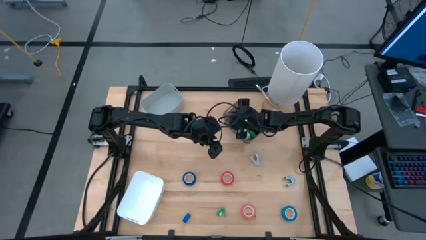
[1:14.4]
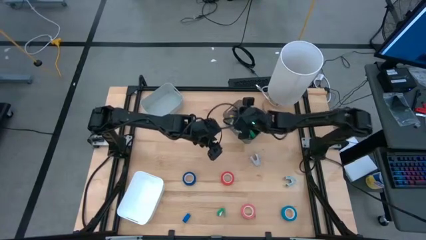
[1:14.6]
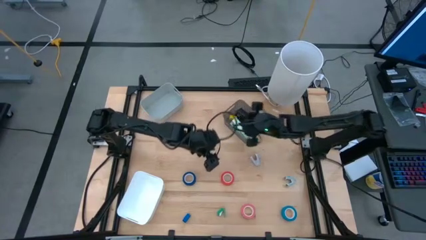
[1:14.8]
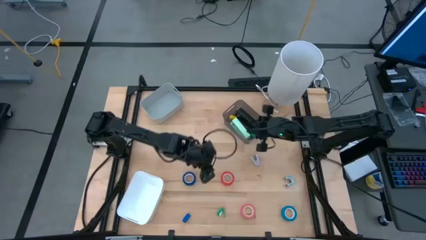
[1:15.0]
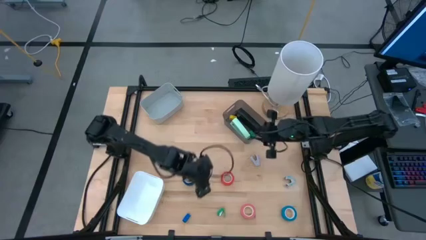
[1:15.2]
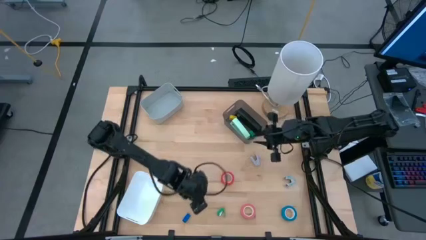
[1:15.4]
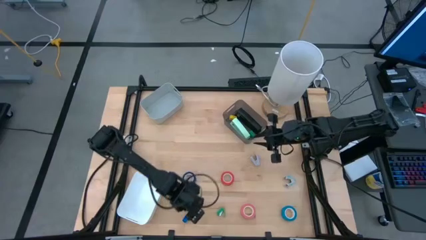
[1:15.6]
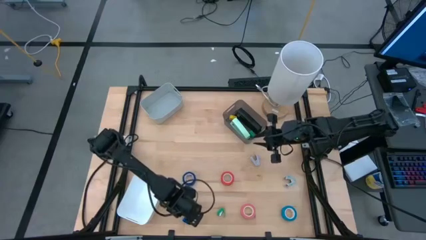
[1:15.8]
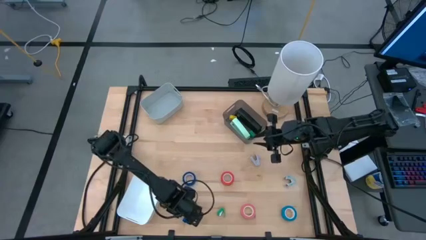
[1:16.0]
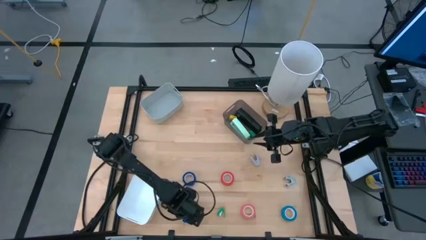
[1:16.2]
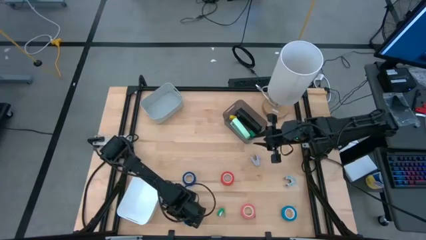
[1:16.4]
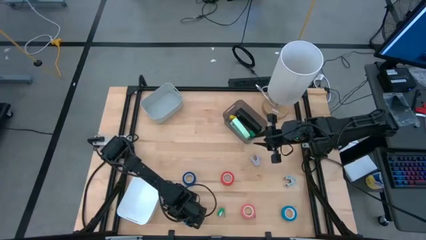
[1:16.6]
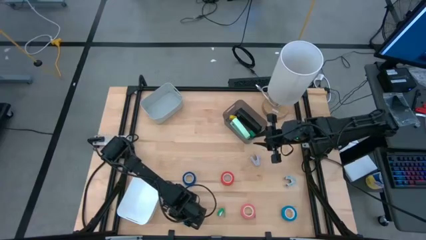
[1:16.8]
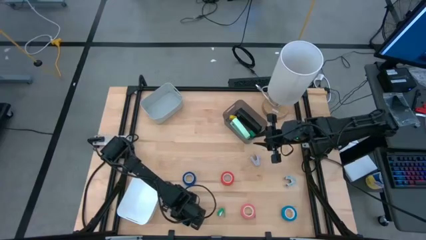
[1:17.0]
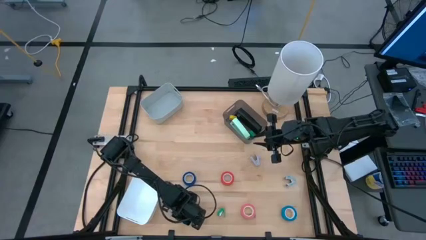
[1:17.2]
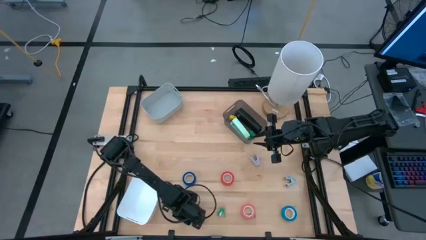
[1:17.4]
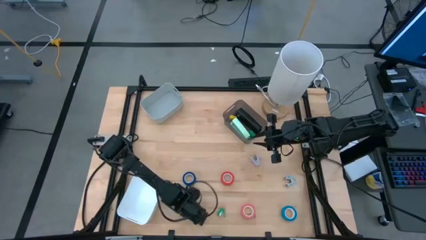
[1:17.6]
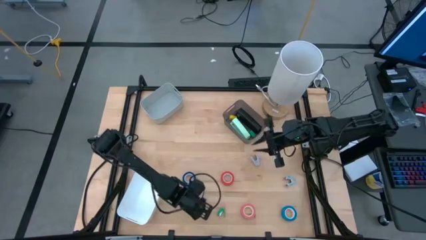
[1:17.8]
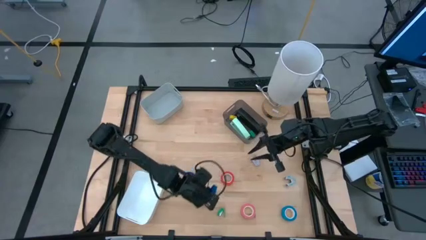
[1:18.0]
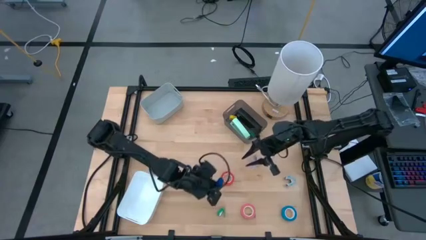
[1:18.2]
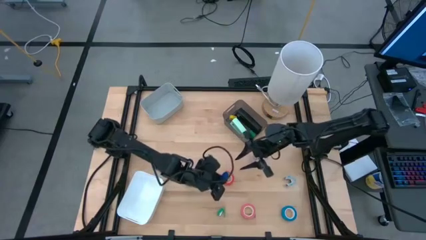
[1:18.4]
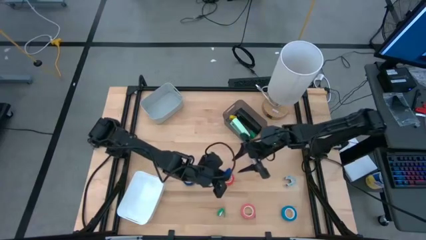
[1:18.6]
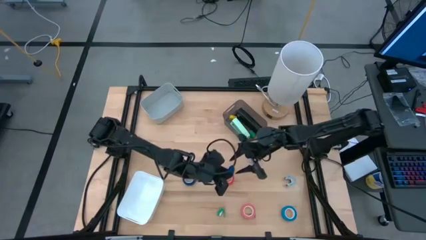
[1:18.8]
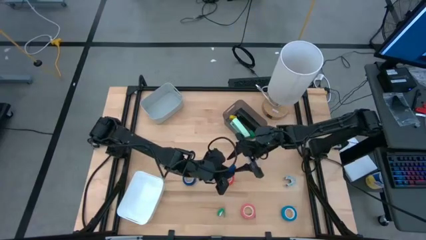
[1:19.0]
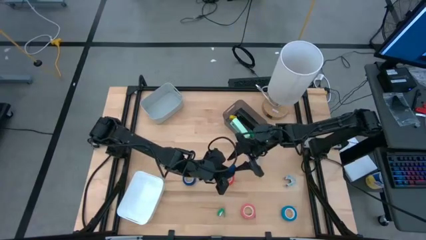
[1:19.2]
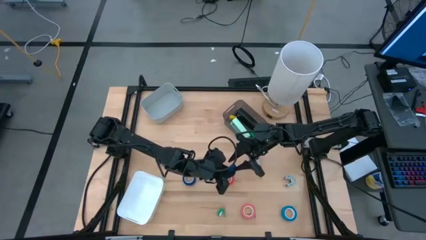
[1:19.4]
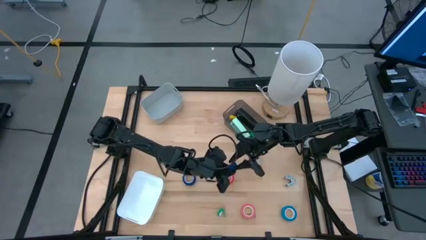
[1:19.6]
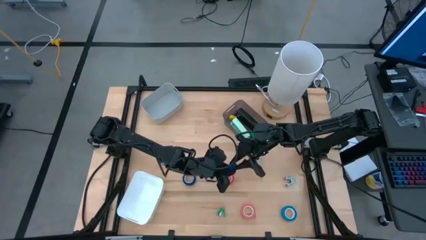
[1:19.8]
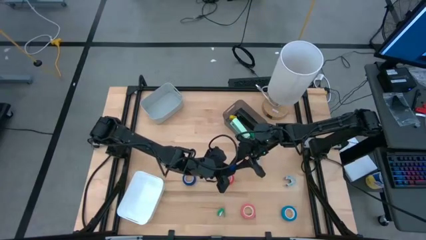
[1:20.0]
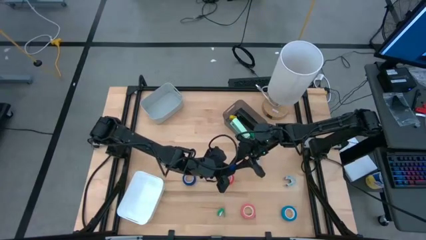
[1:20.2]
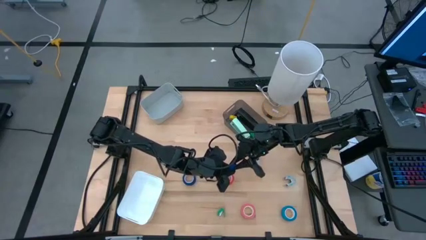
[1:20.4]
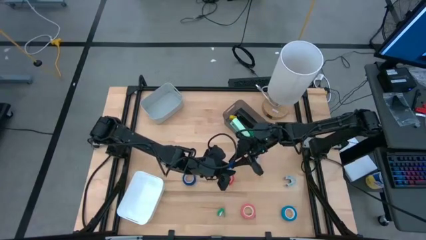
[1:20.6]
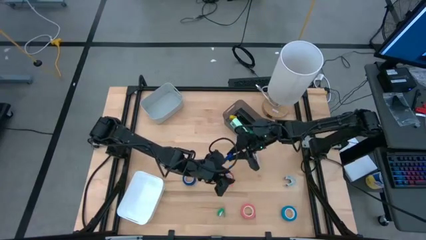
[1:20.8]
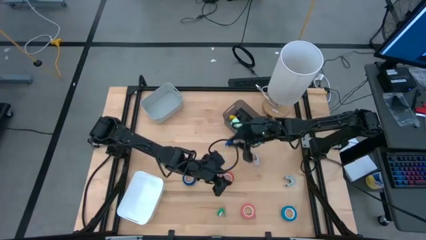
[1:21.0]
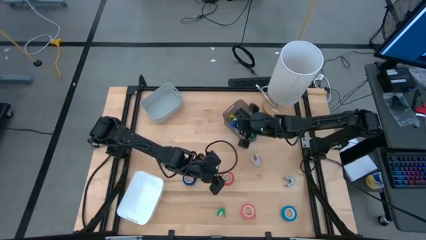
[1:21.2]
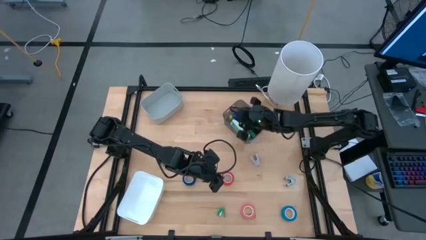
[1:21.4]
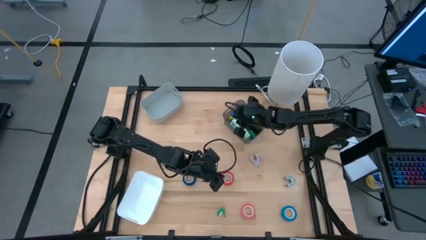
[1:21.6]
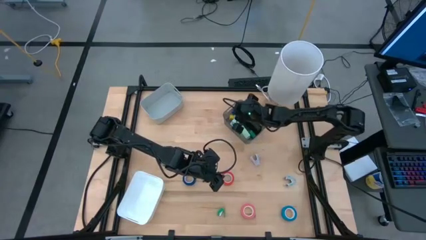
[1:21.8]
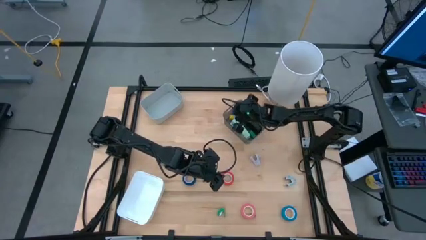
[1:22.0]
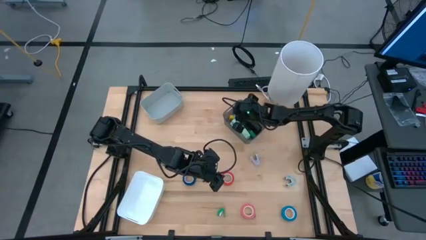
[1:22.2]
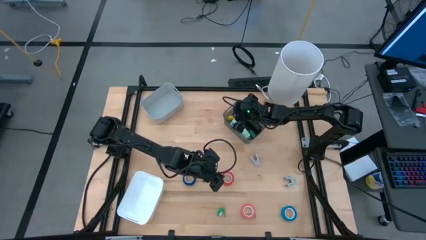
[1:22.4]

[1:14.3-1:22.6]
Task: Pick and place Stapler, Stapler remover, tape
Put the small blue stapler into the black bin

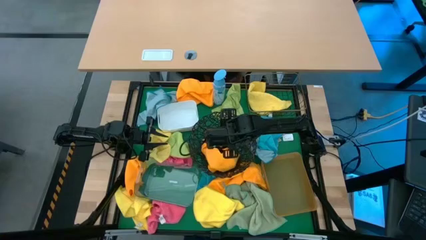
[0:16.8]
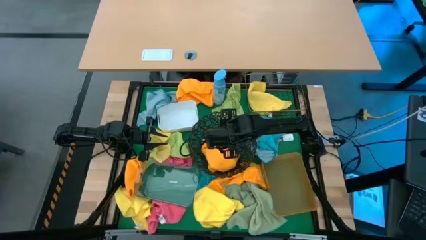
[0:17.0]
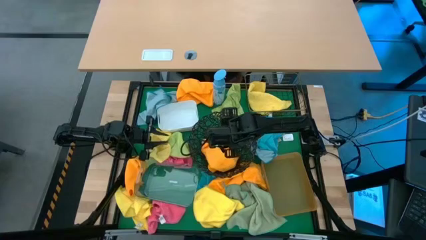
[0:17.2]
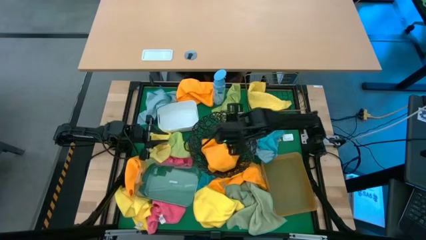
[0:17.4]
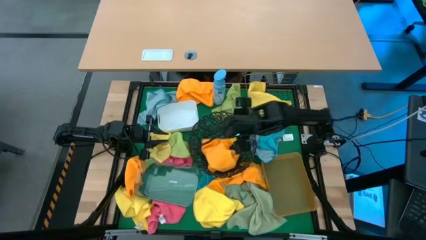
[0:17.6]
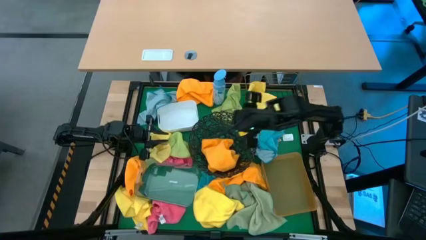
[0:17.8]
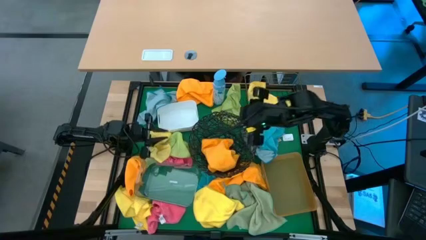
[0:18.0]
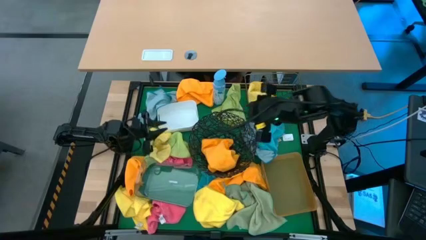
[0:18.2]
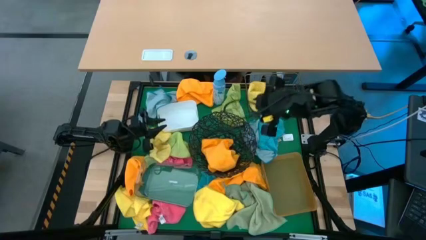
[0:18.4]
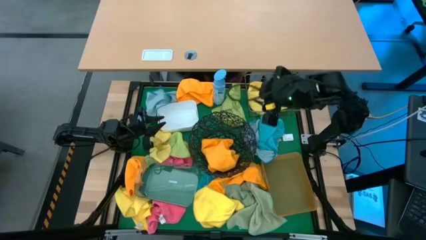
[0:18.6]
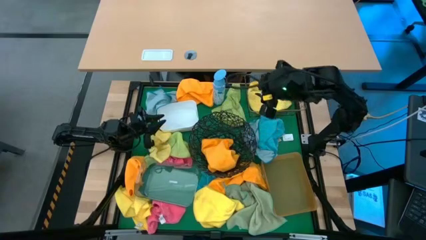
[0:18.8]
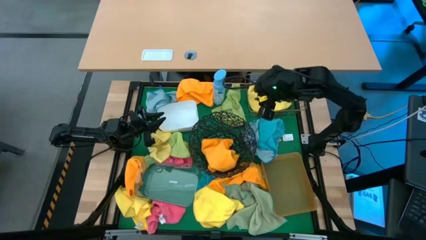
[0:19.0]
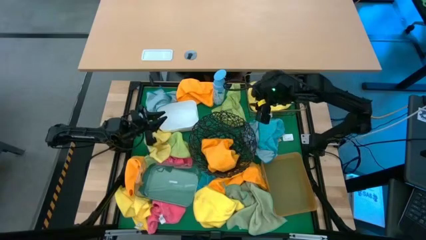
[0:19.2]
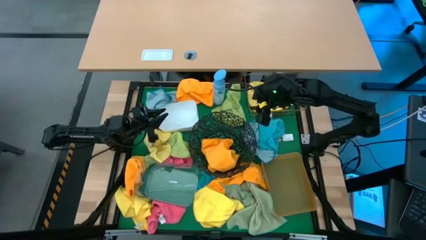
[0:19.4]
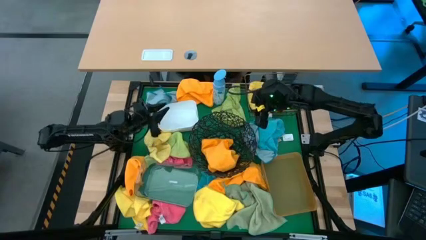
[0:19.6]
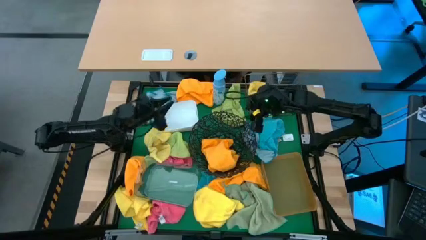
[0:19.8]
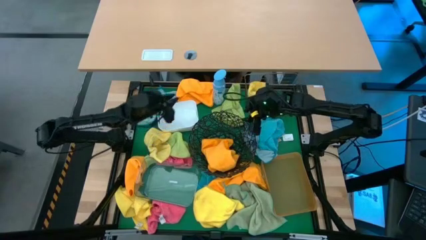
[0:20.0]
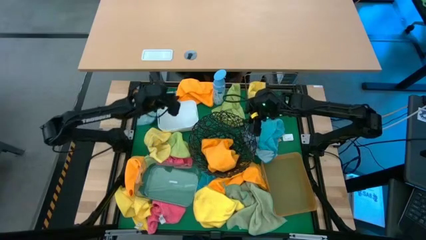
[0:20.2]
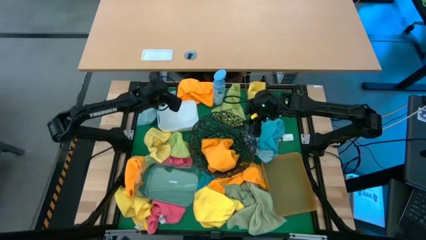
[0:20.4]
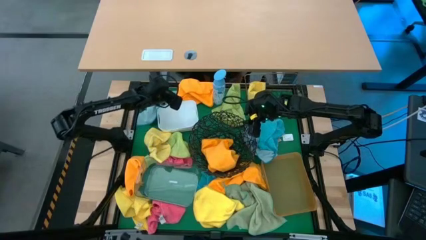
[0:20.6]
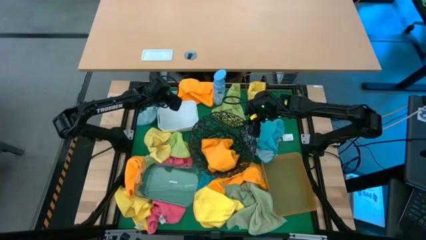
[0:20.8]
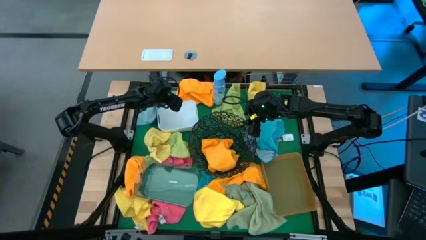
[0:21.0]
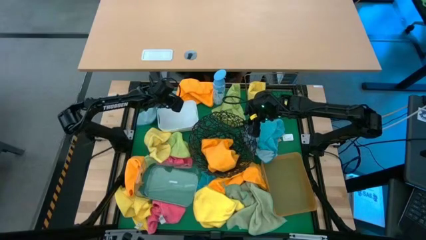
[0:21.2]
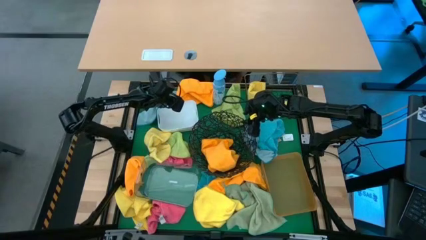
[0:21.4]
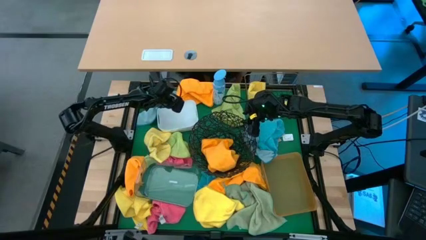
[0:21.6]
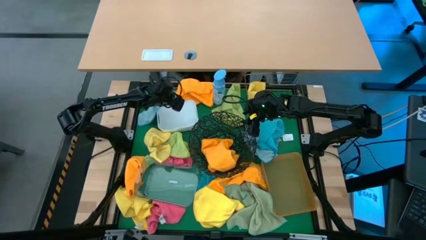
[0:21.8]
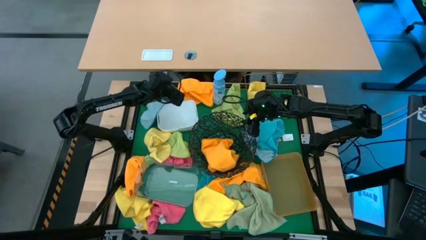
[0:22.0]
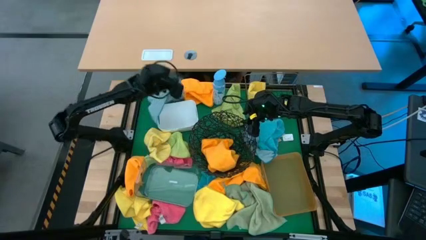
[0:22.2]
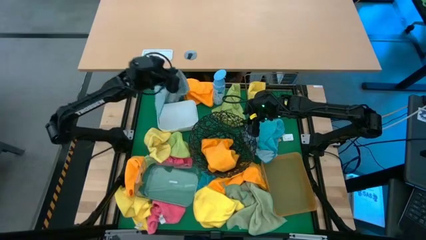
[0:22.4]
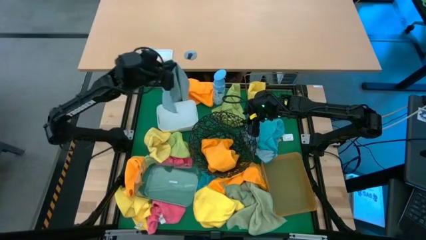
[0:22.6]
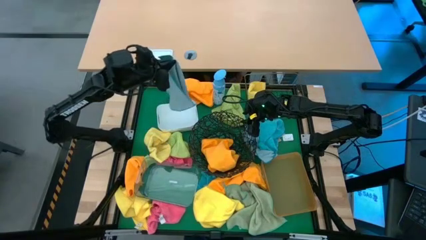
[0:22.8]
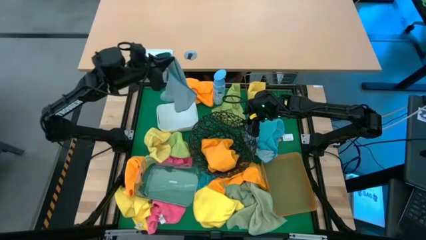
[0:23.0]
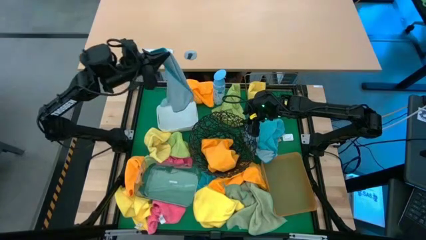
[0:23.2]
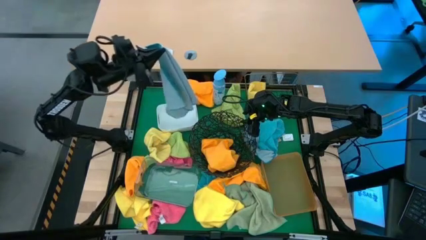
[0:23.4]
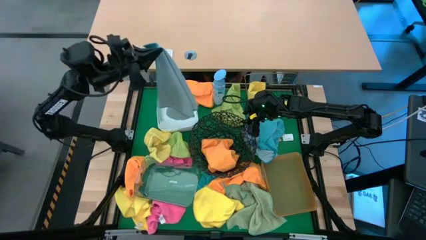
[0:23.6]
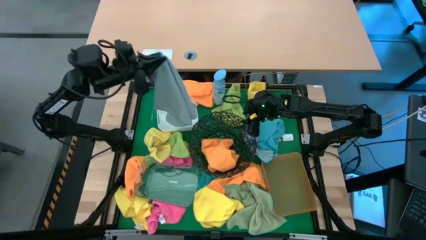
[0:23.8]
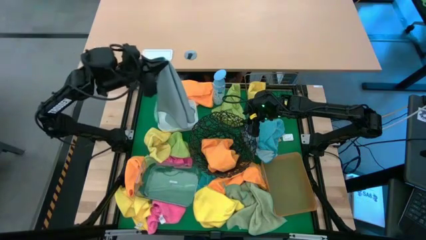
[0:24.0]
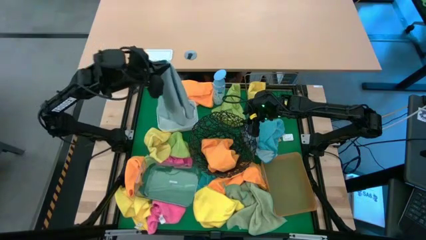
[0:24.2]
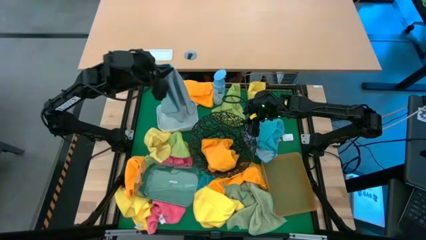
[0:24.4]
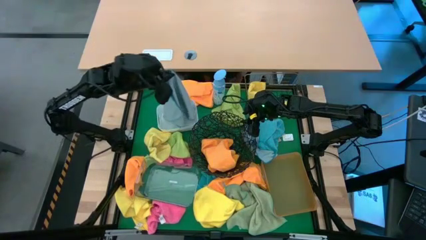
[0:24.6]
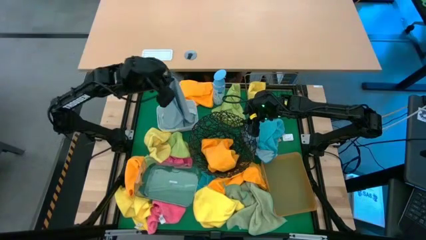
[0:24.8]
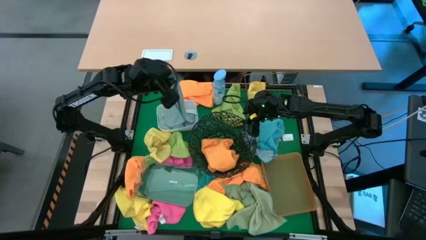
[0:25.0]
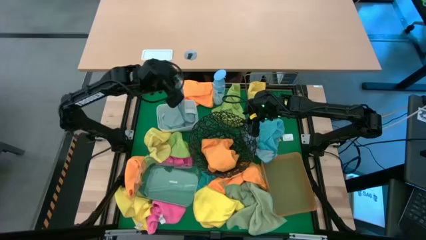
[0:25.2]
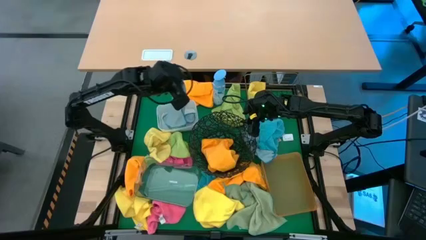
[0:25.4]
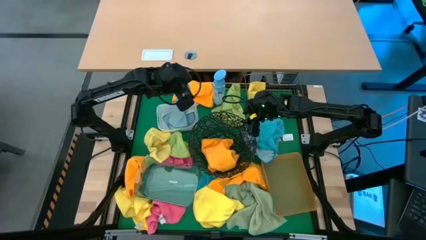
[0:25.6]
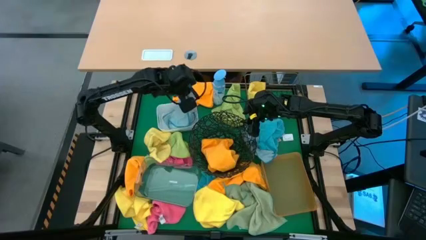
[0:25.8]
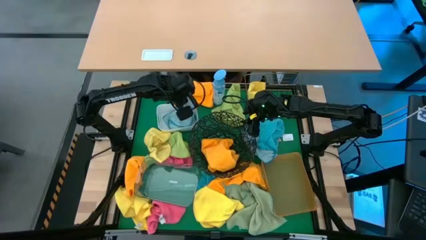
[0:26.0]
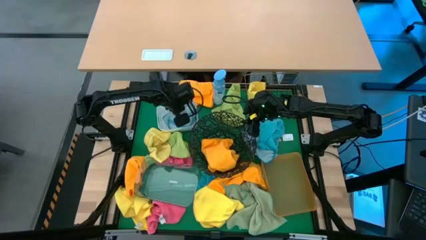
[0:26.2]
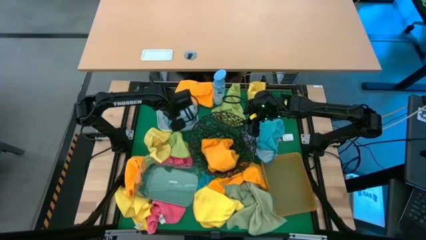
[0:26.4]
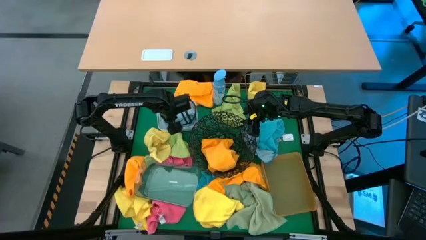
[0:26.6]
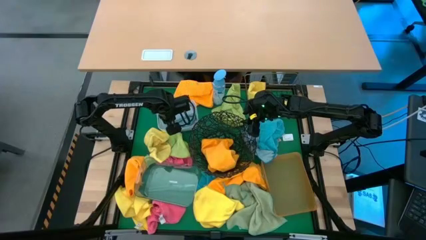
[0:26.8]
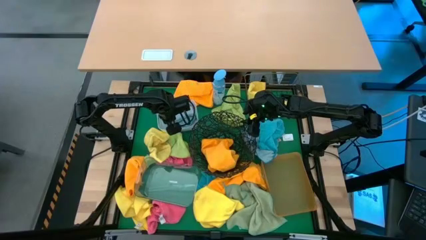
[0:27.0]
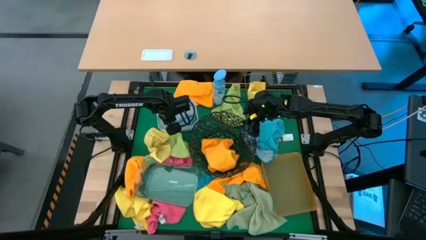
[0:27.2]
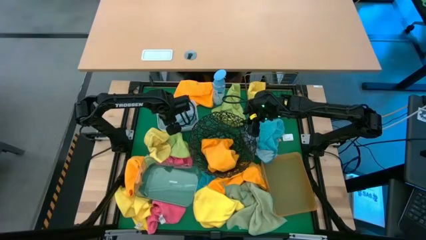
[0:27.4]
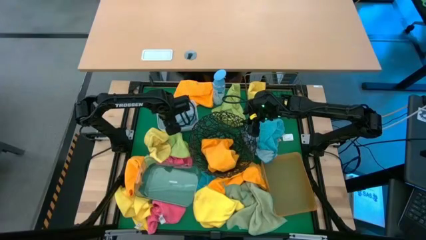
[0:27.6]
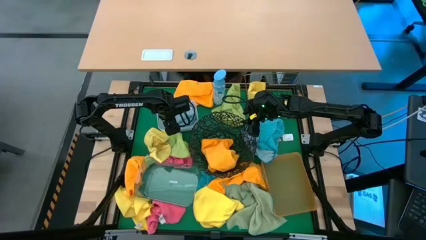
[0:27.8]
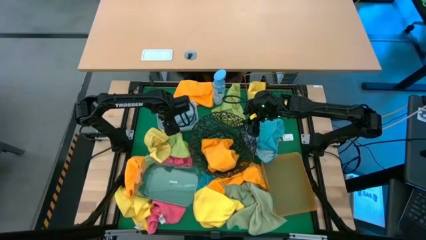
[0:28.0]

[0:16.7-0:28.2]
Task: Sort microfiber towel by color & place in baskets
Put the light blue microfiber towel into the white bin
